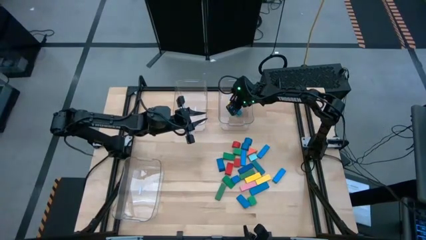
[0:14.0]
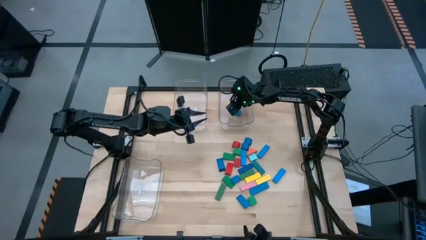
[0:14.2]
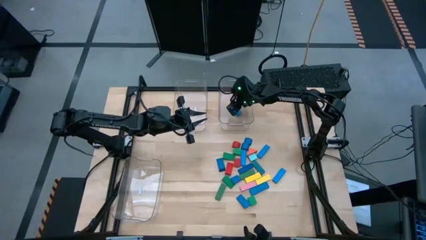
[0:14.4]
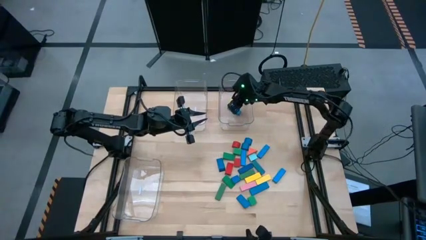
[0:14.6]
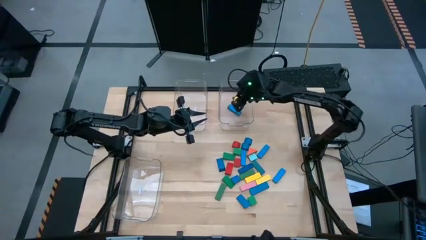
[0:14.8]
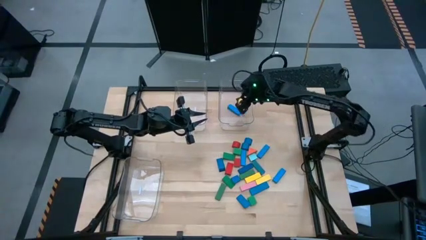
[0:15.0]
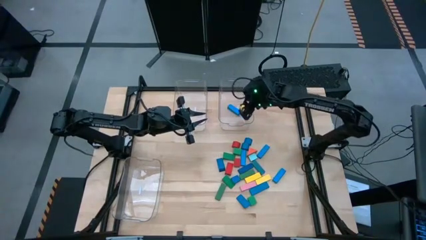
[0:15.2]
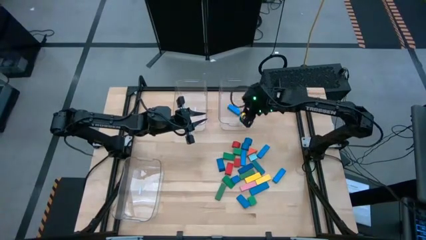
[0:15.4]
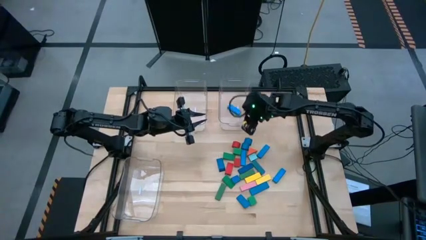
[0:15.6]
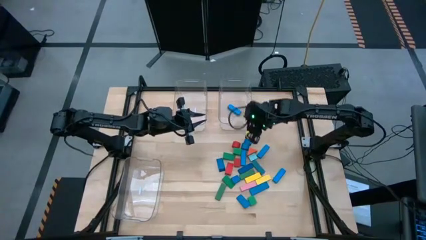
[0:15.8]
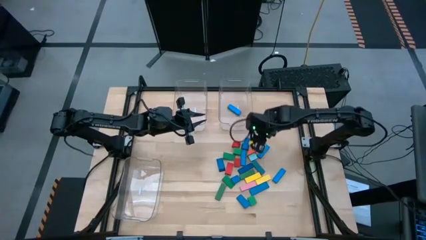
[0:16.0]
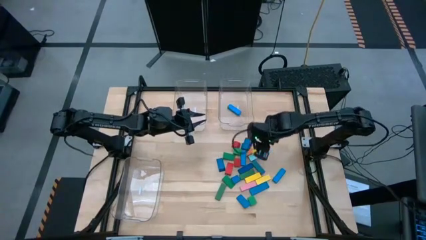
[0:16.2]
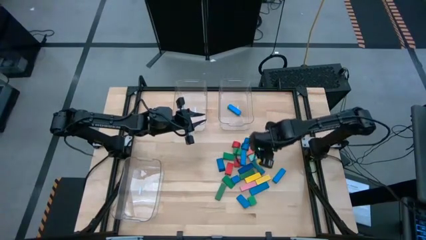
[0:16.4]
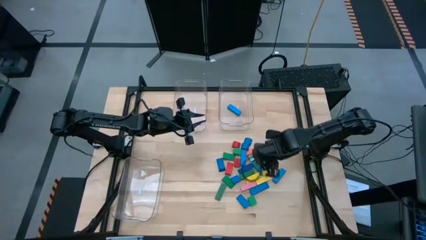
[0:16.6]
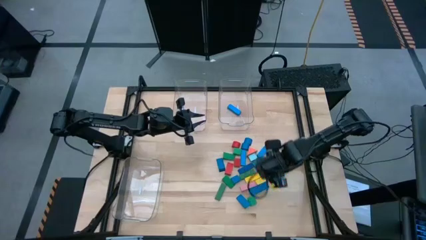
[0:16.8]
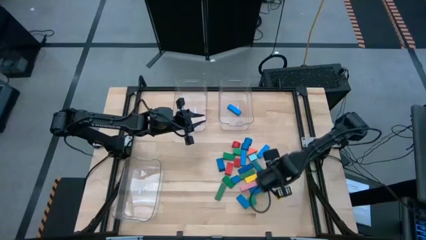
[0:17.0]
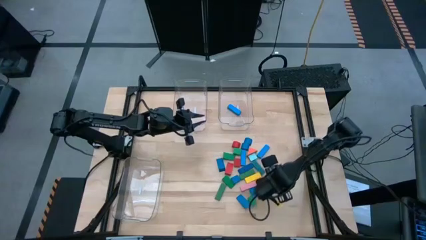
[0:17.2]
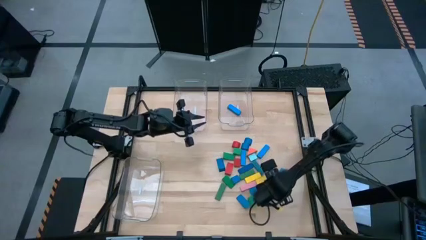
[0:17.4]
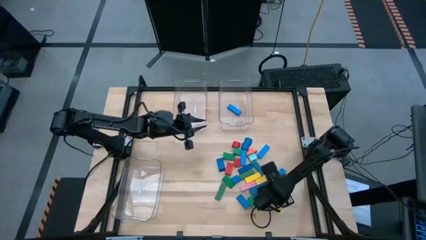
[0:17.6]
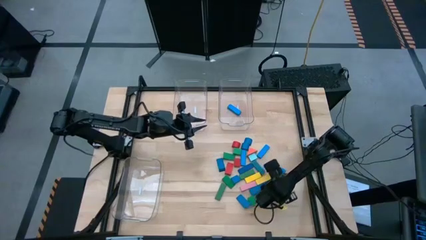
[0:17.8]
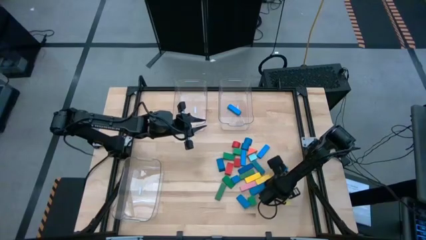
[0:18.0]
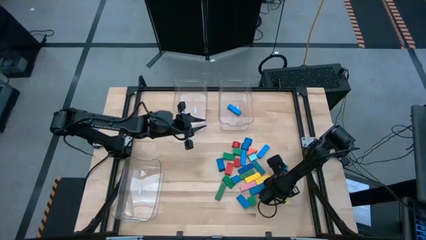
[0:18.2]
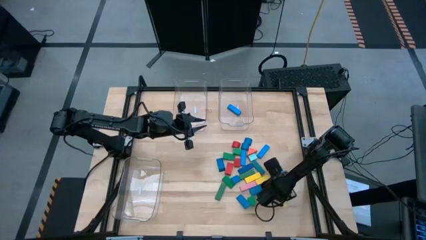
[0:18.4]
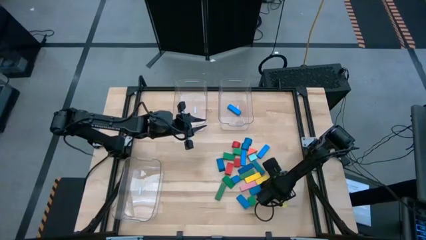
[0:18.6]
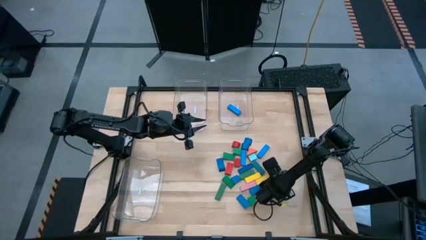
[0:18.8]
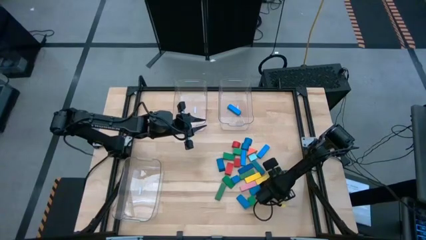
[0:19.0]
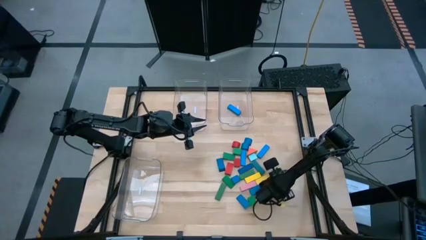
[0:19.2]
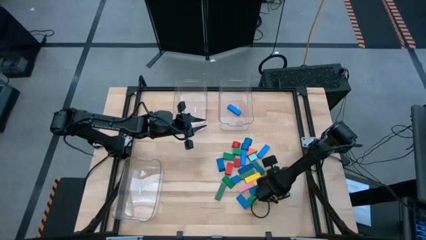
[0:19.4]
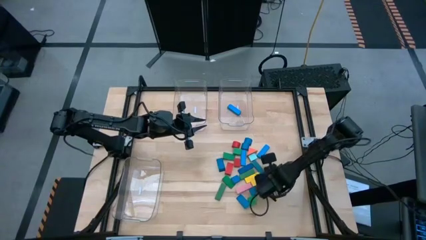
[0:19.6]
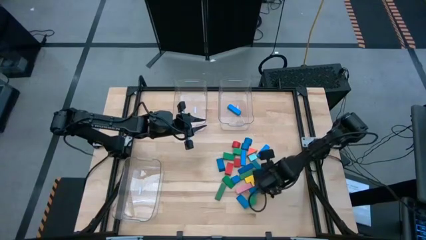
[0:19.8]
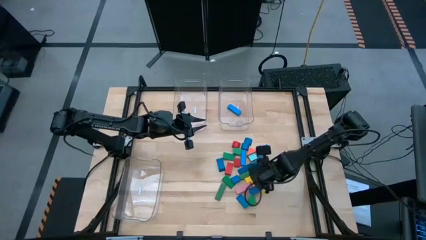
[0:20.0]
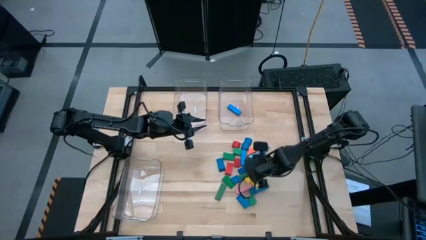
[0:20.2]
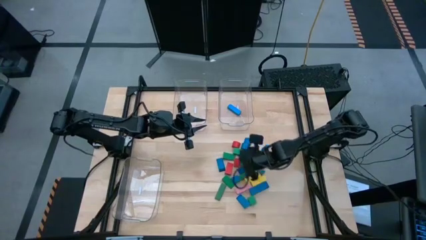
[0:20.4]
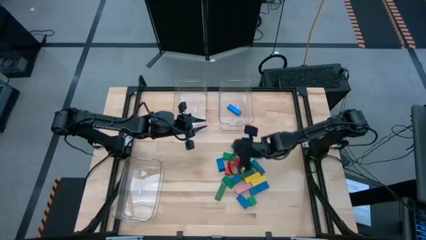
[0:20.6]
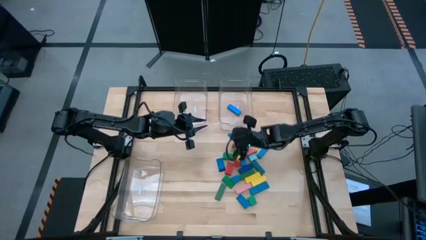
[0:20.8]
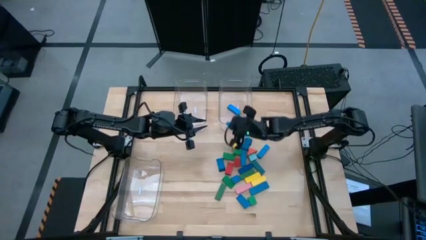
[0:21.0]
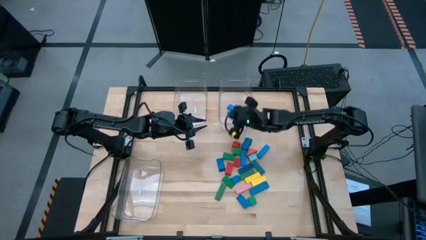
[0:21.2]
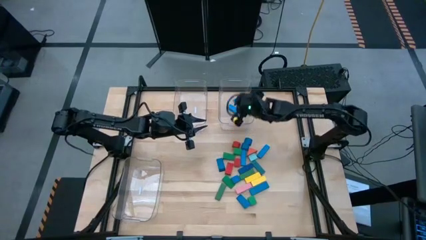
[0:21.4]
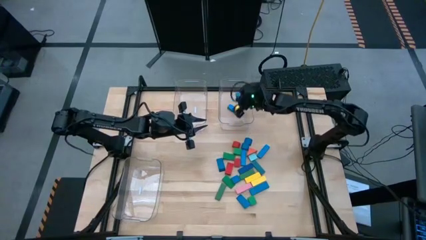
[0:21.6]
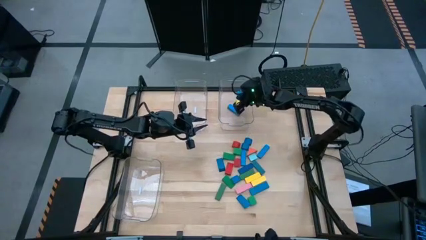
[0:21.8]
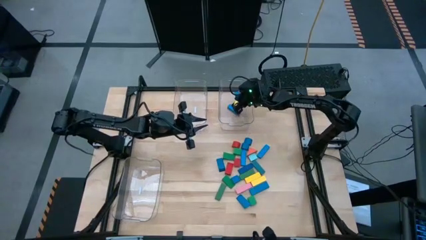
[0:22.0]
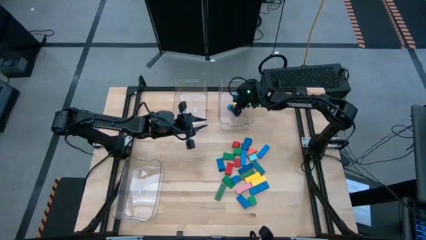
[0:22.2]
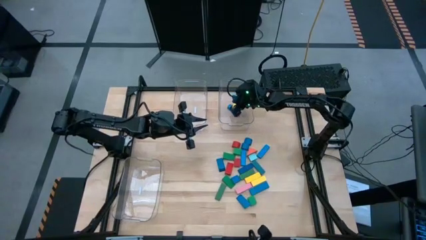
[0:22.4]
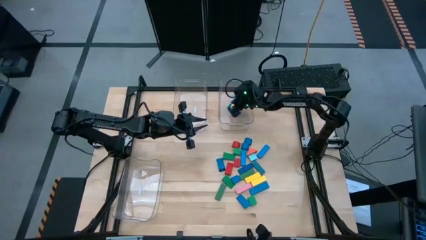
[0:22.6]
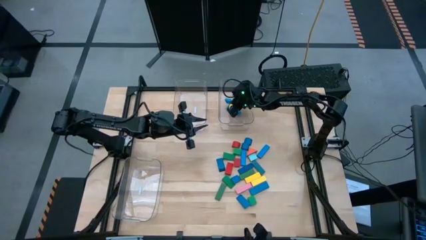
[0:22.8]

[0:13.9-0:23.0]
Task: Sort blocks by size
Put the blue rectangular block into the top right transparent bin

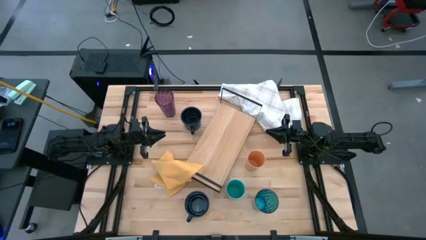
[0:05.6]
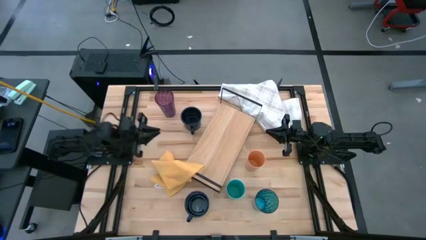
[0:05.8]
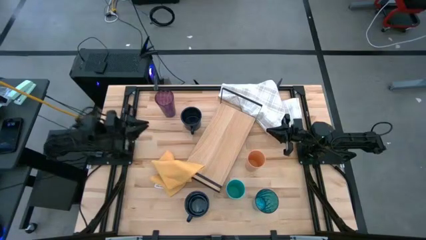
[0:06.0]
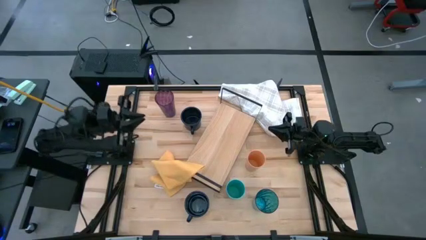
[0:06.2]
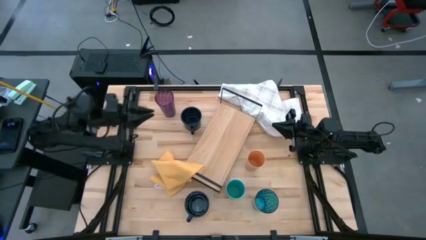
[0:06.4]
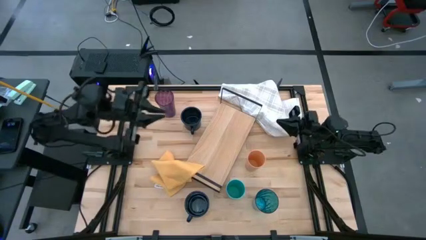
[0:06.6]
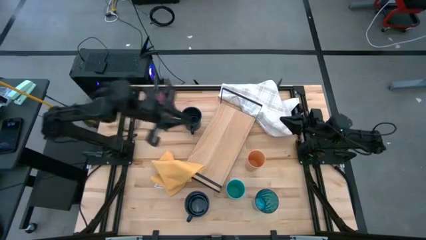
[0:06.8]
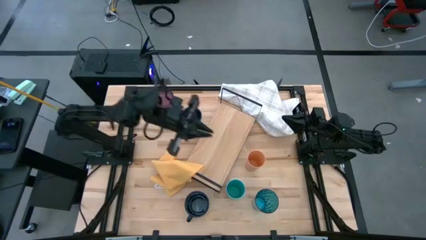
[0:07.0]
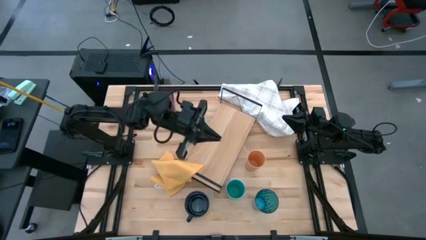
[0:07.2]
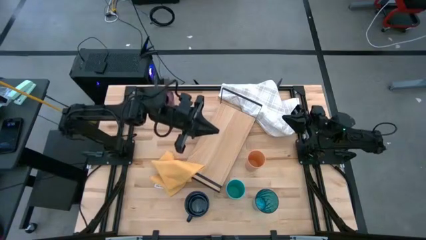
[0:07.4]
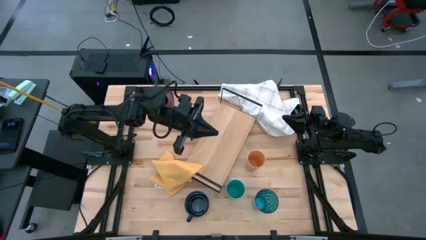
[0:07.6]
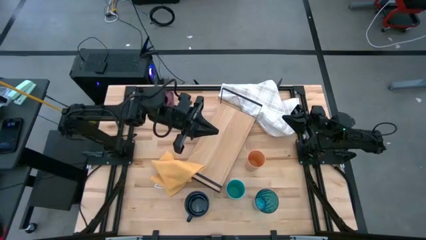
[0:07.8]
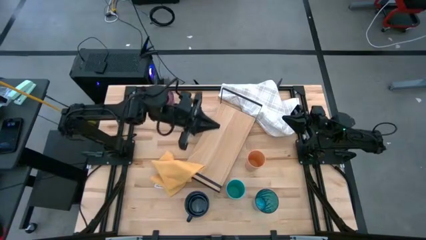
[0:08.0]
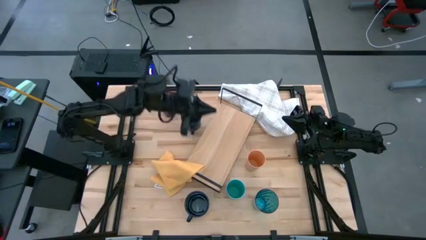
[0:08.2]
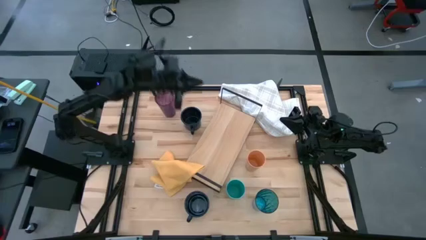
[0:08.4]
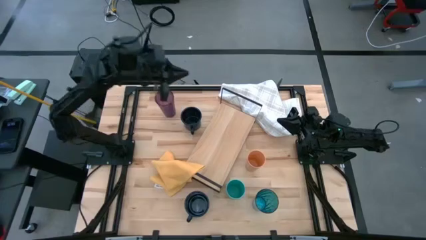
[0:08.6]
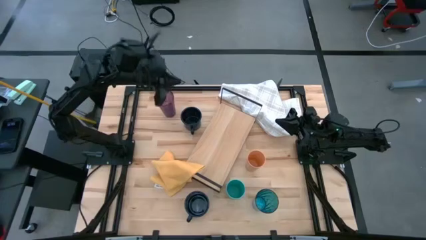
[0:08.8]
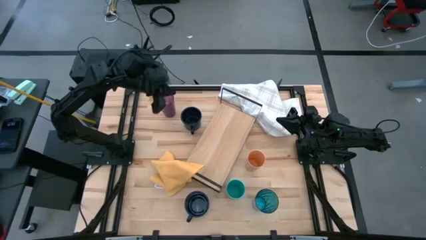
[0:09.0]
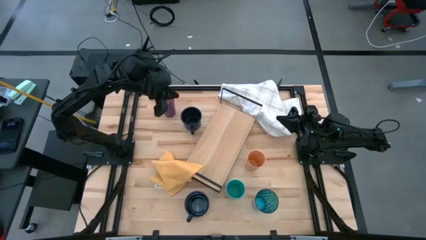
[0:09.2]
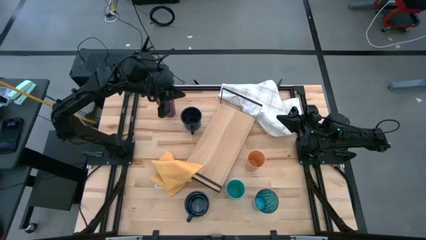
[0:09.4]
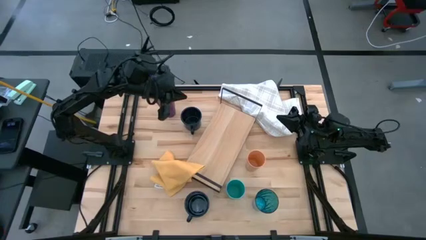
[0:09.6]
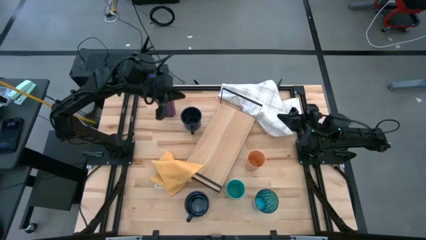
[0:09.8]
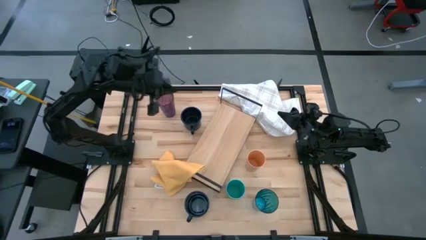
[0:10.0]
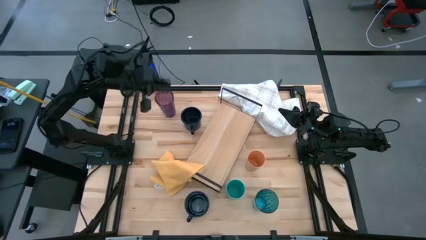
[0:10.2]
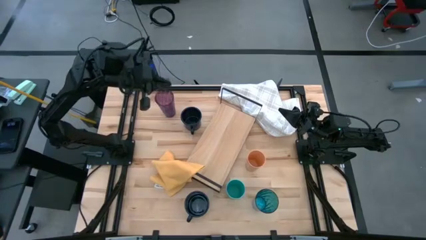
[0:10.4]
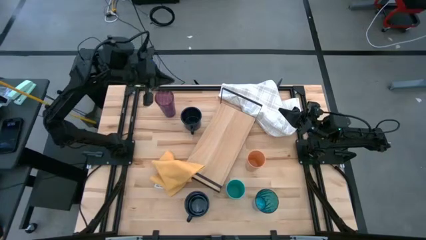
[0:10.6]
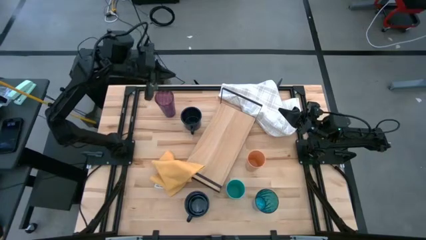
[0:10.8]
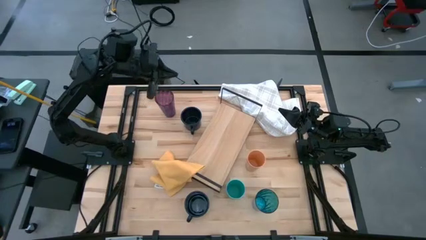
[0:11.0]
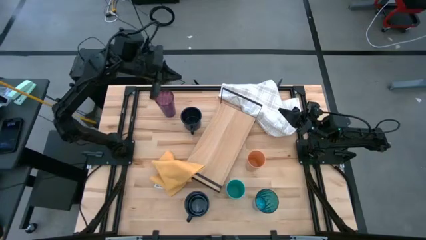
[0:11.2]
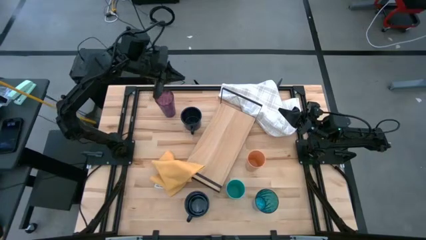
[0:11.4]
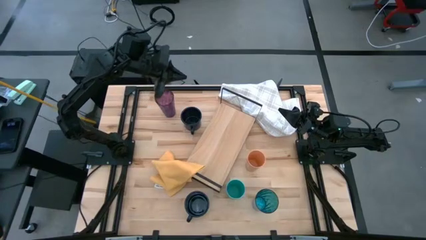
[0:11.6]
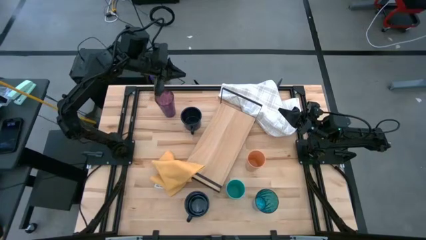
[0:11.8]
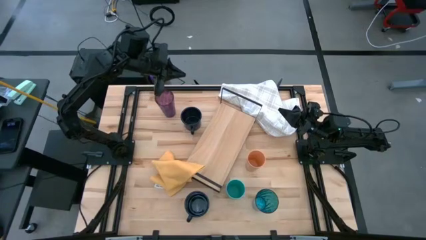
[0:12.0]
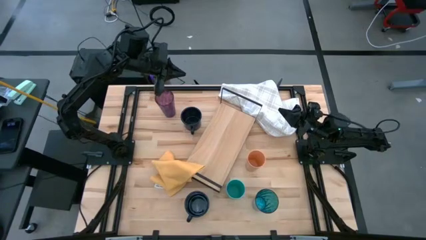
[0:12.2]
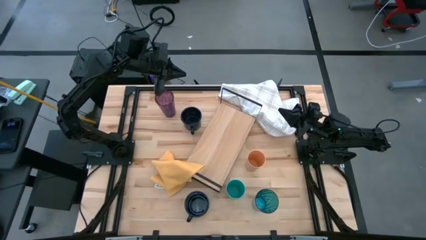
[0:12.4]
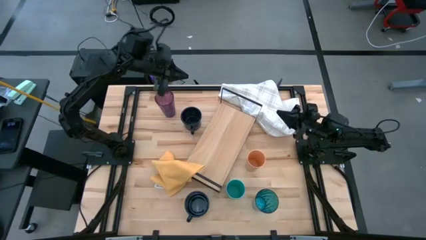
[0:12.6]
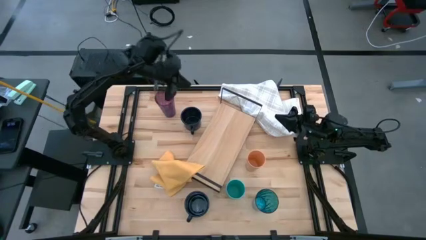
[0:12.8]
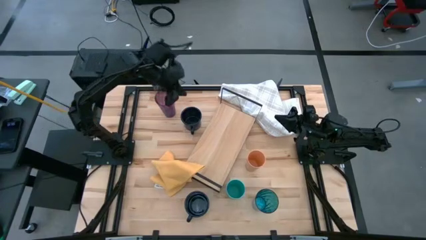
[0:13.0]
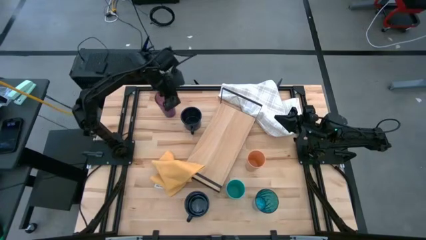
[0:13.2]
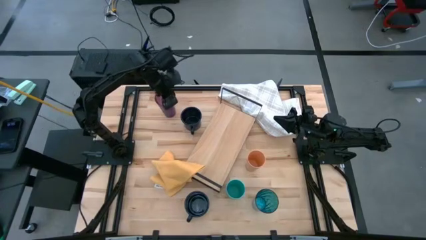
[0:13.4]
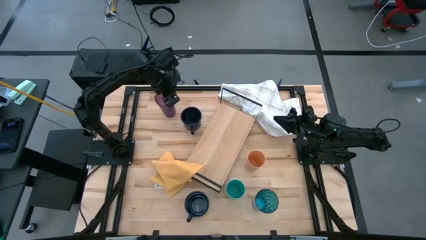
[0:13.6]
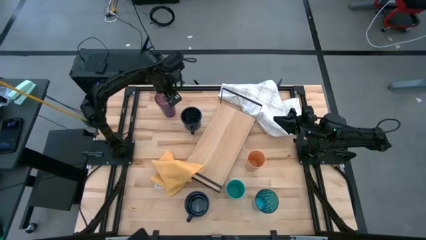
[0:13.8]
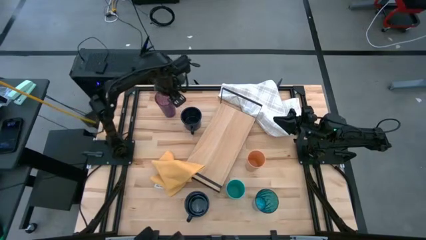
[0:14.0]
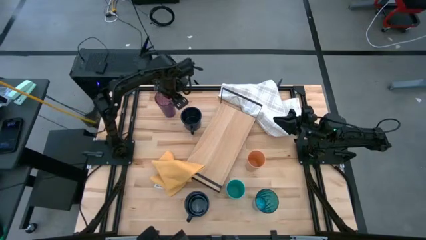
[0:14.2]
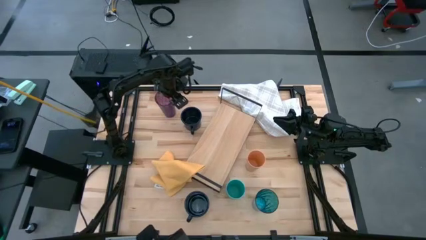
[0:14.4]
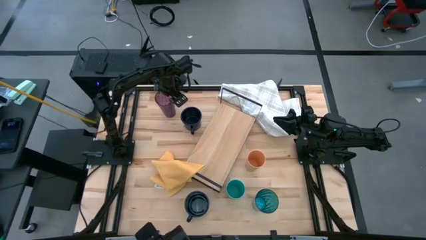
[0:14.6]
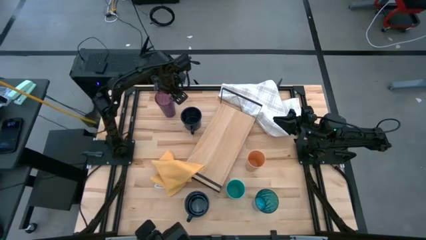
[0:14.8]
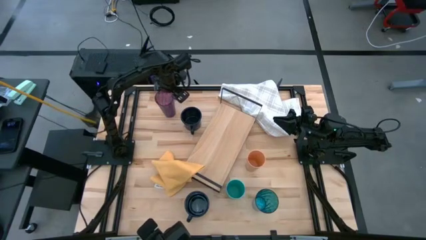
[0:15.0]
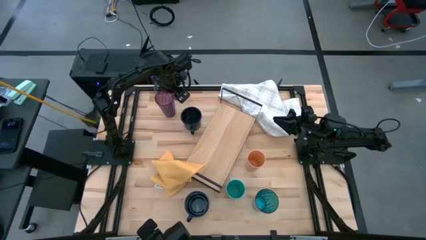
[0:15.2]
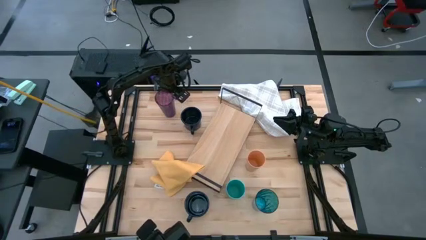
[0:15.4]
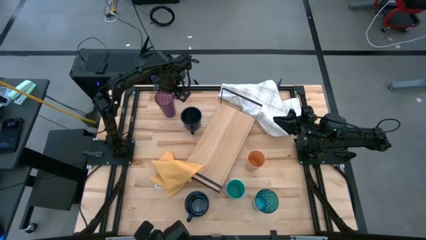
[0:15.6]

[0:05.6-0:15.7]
Task: Stack small to large cups/mugs on shelf
Put the purple cup on the shelf
